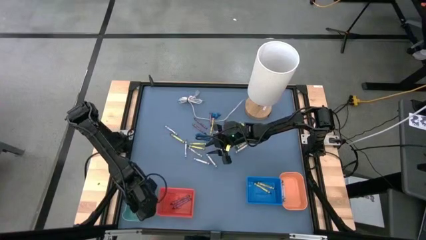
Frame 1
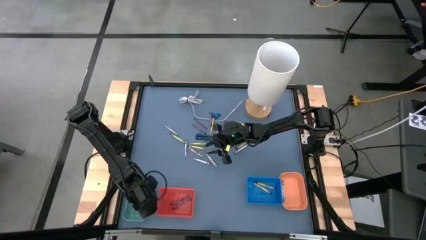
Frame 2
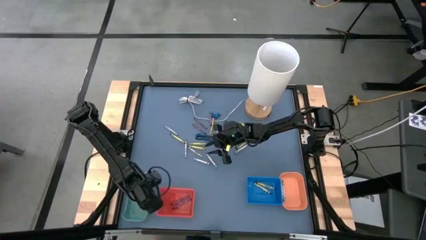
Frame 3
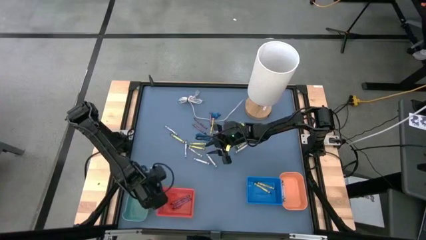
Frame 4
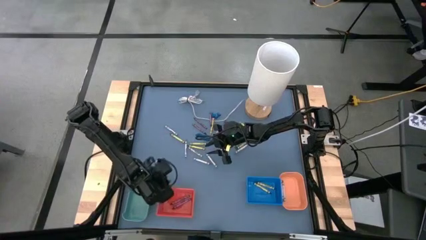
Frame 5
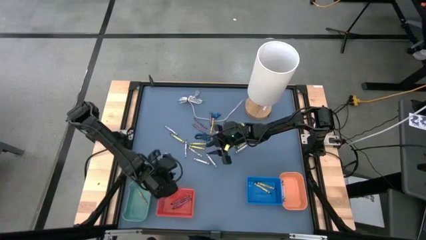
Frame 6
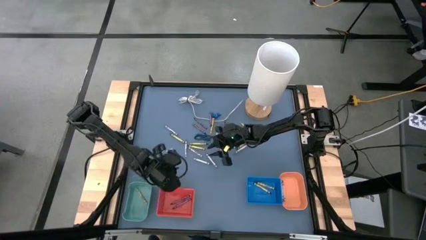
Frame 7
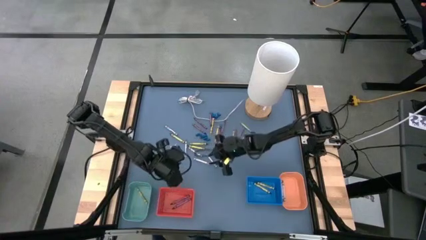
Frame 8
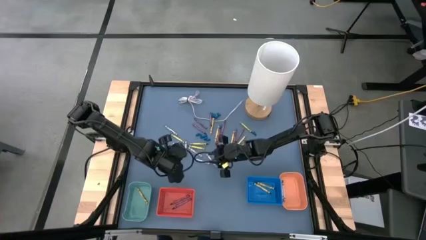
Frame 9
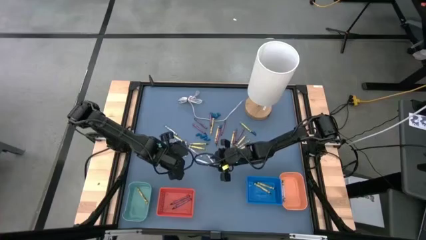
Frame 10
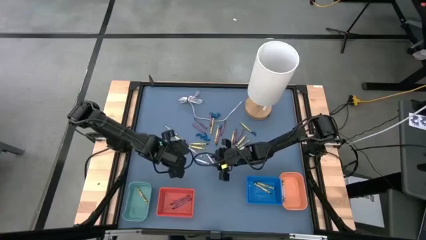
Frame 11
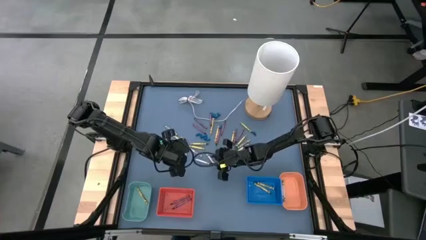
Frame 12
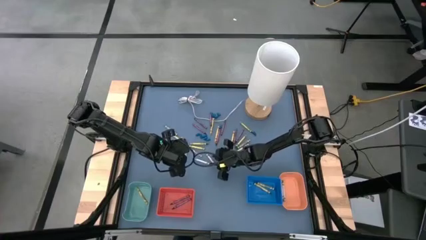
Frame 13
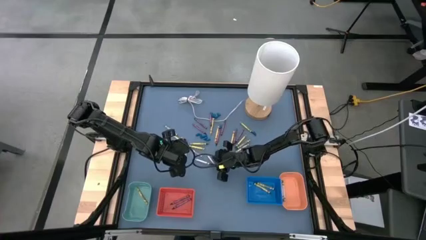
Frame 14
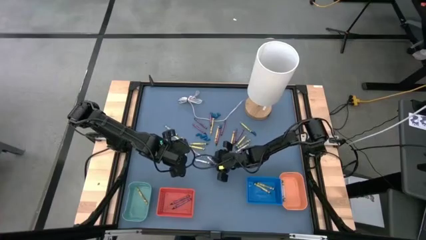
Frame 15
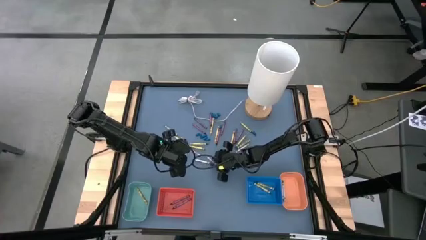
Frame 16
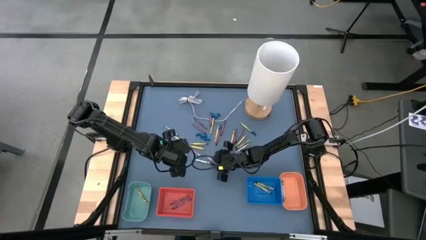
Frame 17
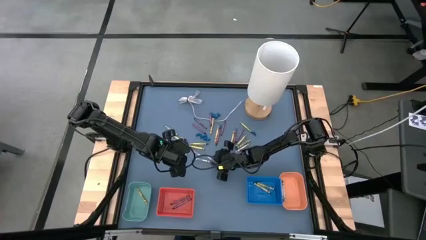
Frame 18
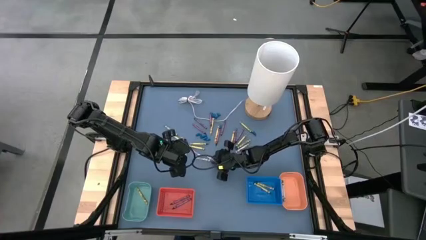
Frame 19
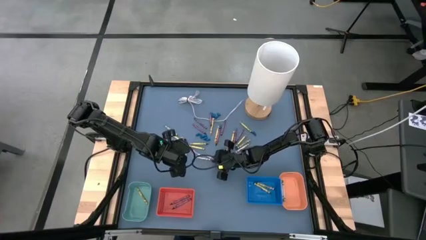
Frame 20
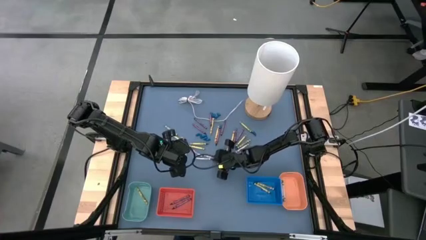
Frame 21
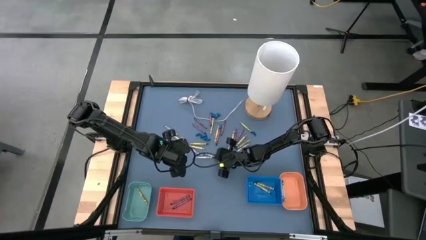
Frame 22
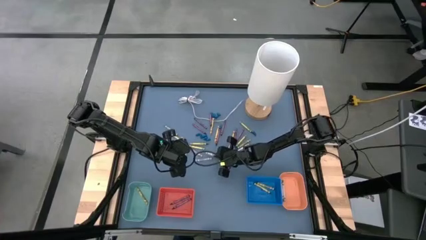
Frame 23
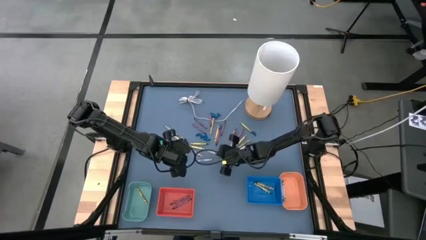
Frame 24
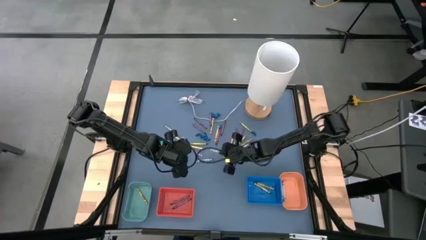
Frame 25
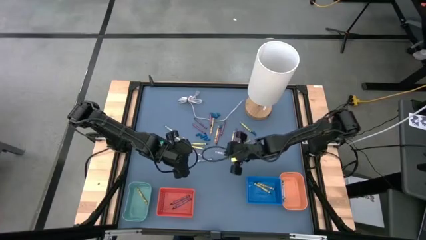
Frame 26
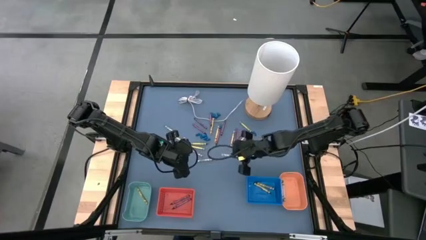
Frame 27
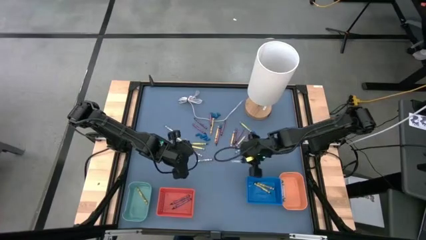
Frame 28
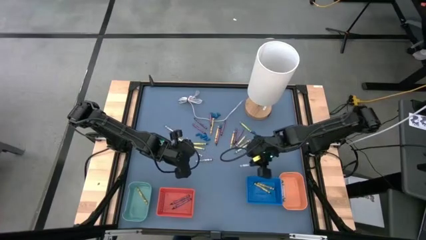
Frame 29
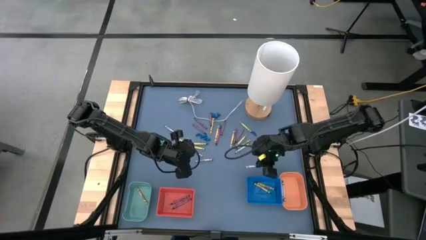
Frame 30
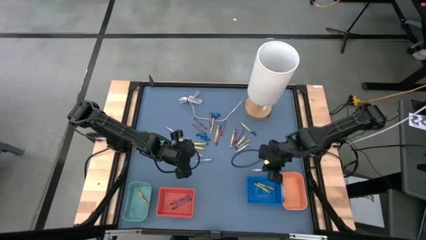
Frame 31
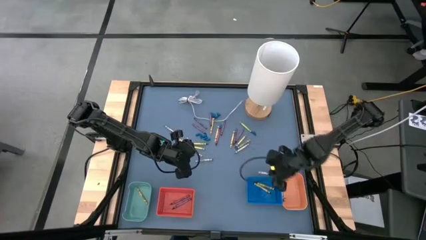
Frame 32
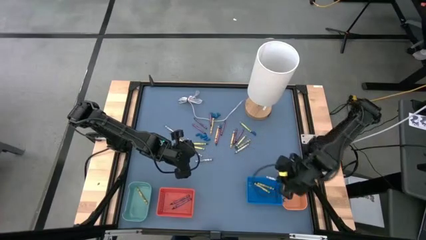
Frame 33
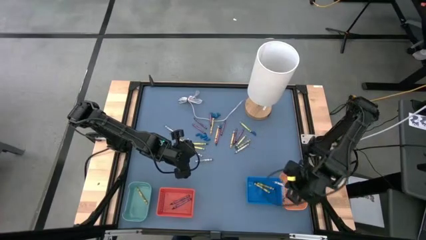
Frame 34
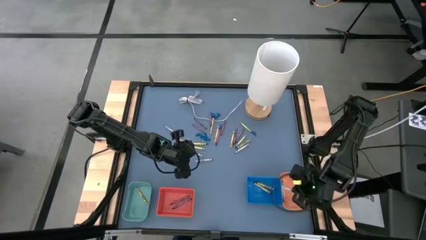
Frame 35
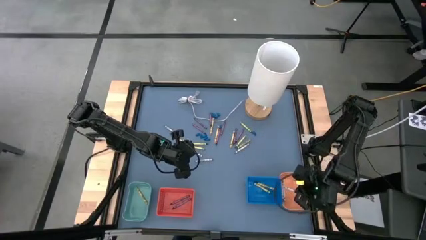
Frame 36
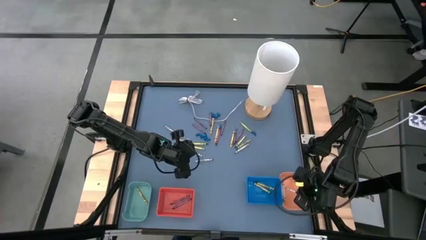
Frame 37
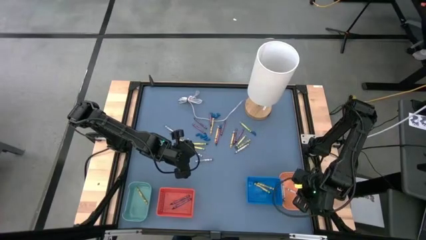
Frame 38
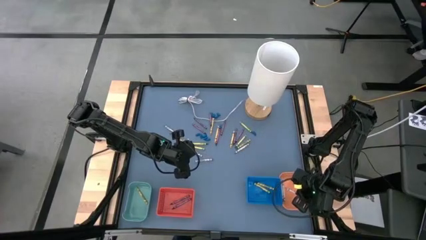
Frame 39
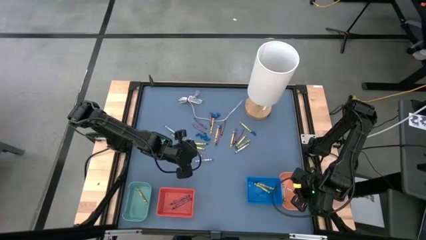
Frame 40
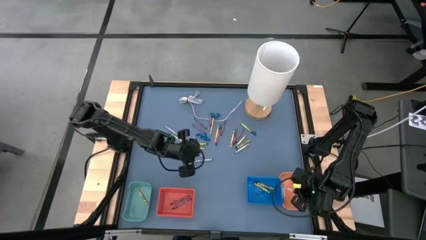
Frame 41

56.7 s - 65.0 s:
Task: Sort crayons
Put the gray crayon into the orange bin

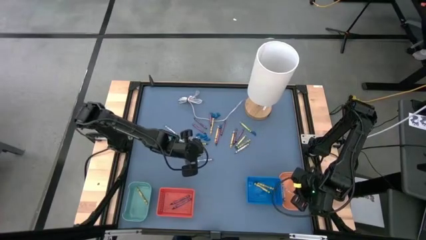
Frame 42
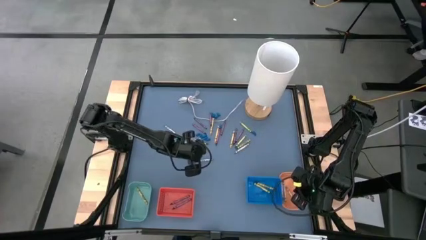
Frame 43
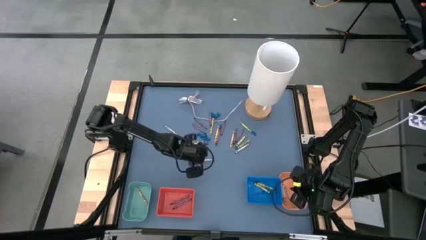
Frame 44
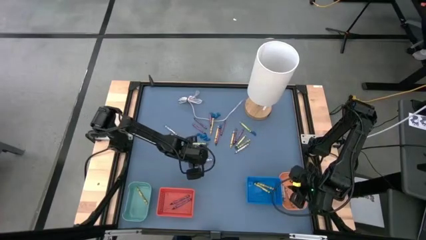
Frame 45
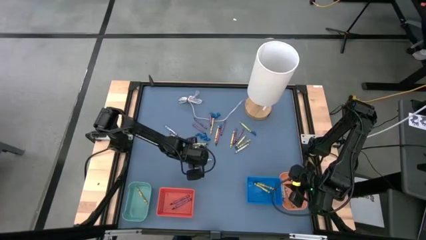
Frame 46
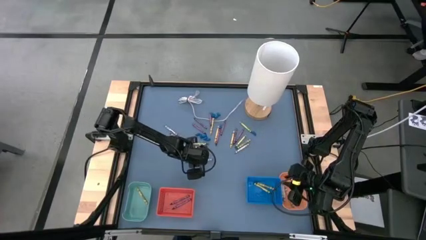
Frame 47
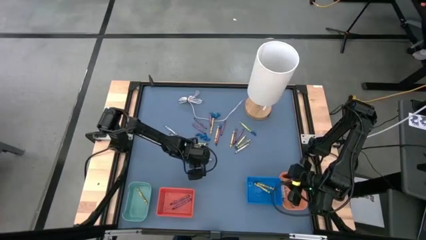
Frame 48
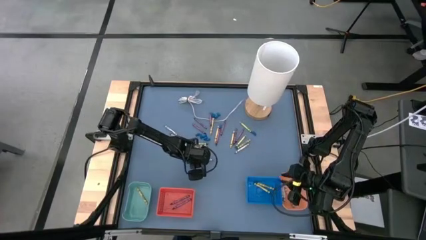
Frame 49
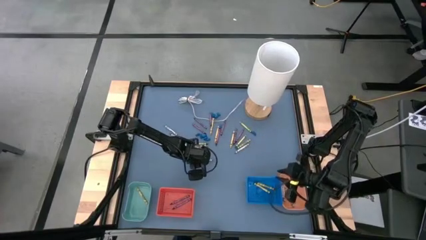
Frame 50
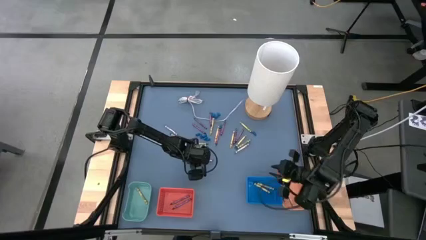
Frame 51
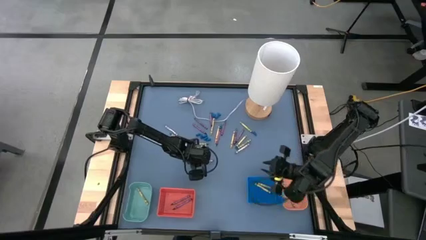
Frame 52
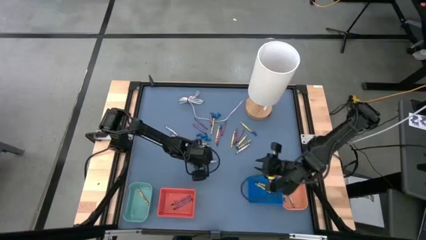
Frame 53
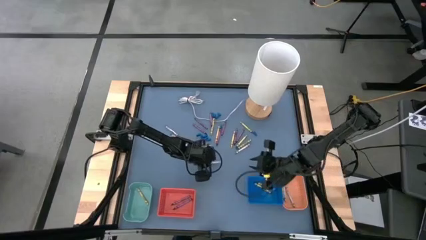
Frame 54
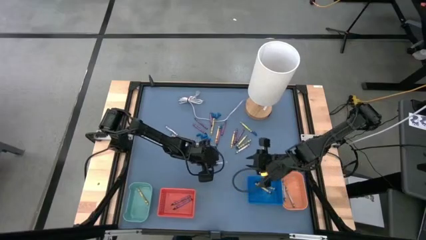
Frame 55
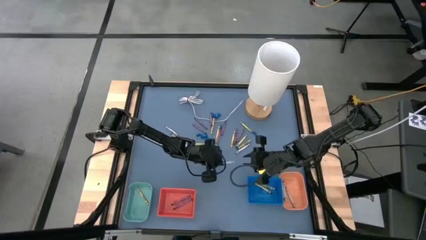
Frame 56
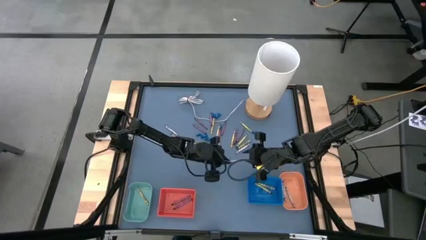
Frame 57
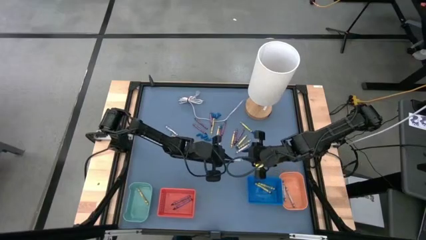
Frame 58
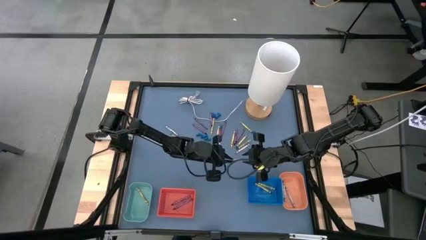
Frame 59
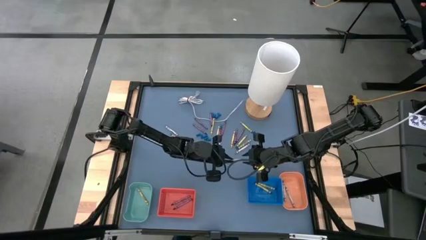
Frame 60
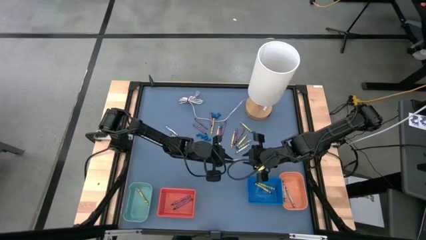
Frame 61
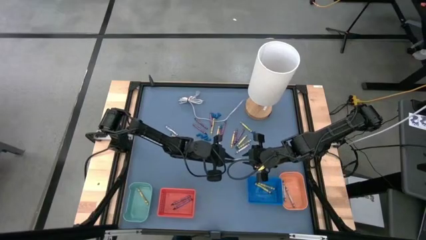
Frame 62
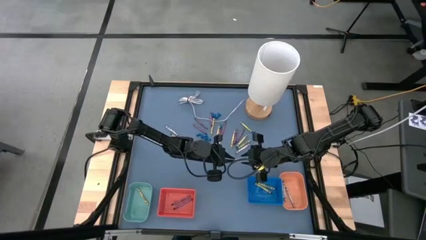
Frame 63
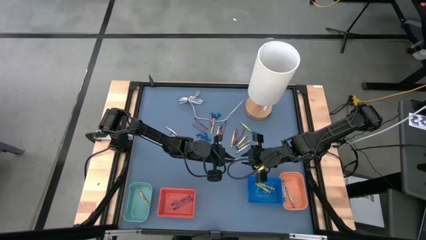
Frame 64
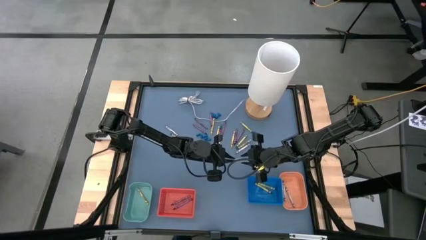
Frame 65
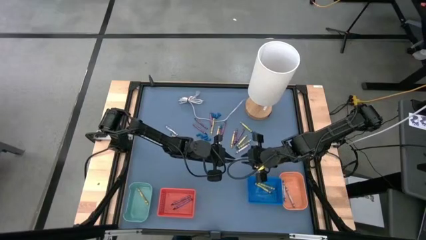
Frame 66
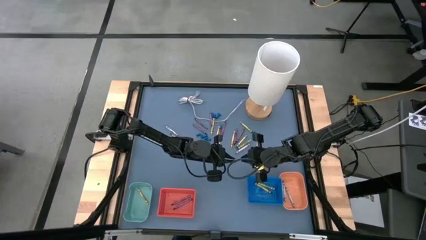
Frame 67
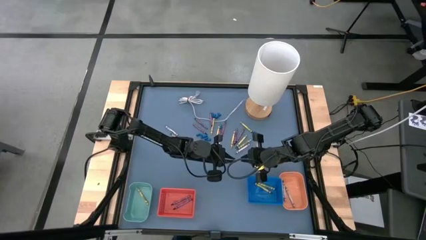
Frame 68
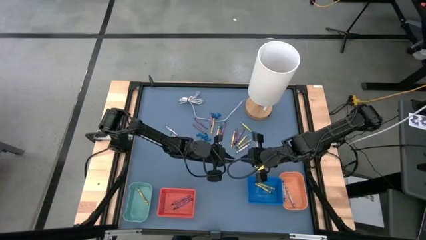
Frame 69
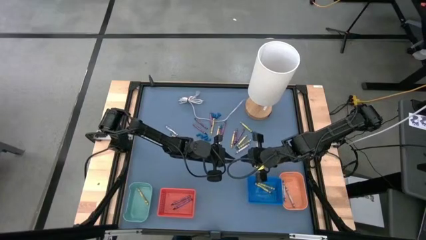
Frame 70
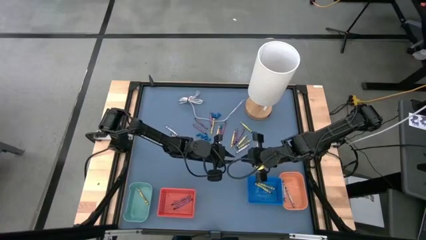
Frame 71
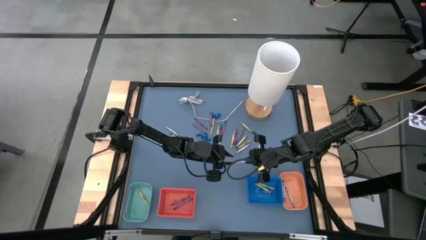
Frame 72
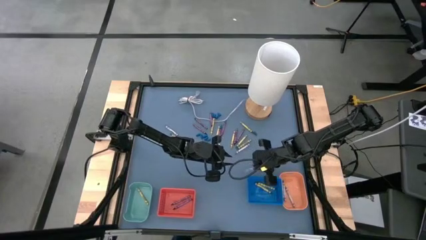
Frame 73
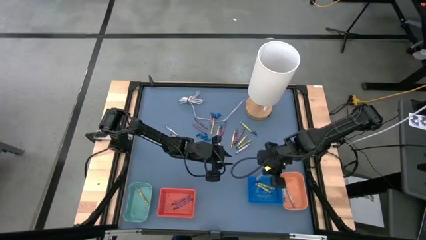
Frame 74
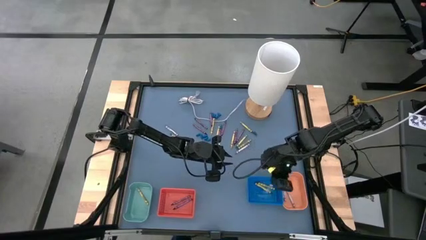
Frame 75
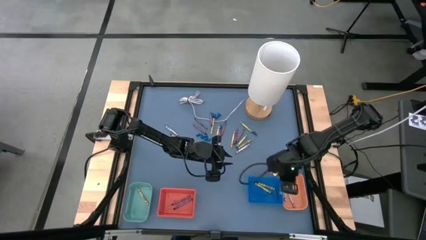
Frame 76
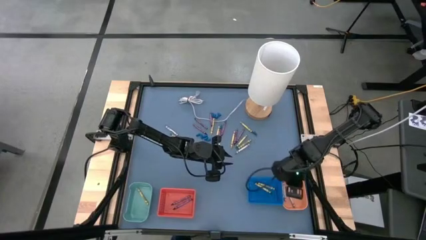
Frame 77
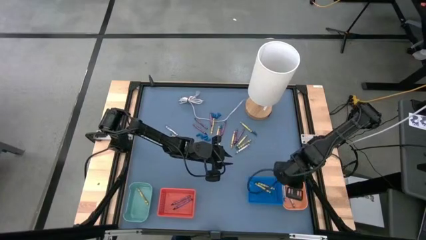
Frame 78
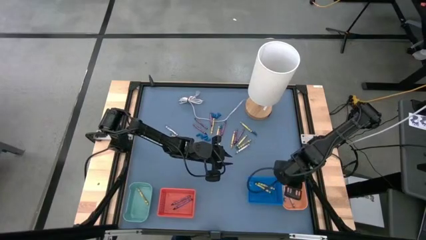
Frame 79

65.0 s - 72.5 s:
Put the gray crayon into the orange bin
